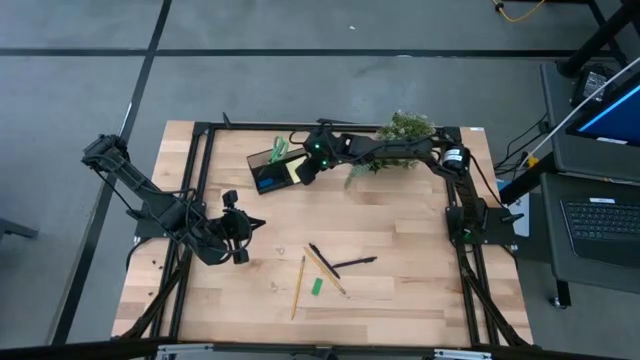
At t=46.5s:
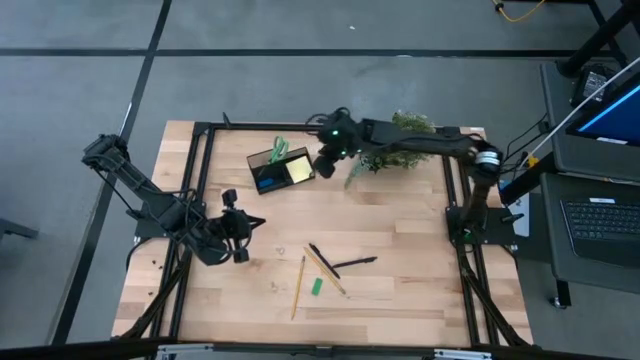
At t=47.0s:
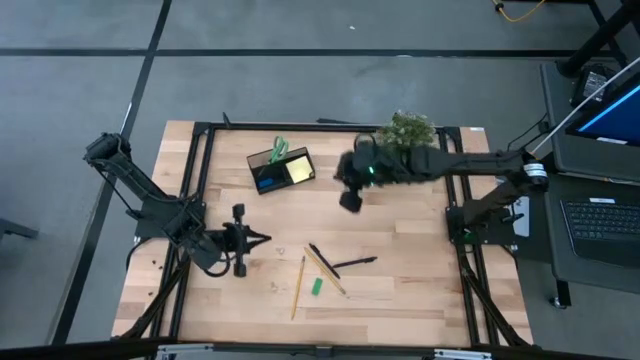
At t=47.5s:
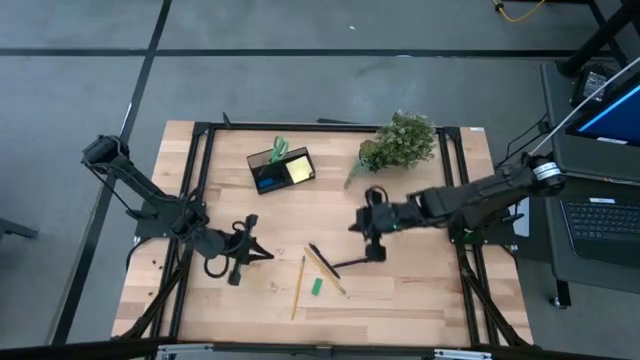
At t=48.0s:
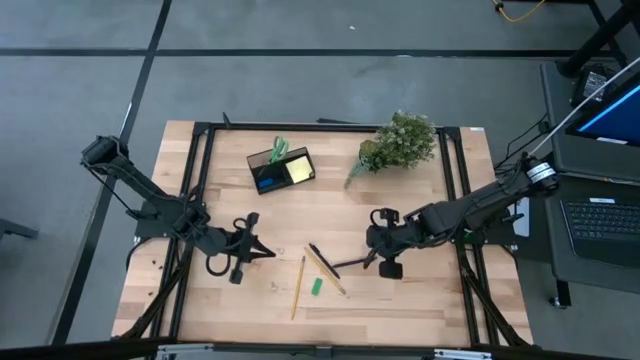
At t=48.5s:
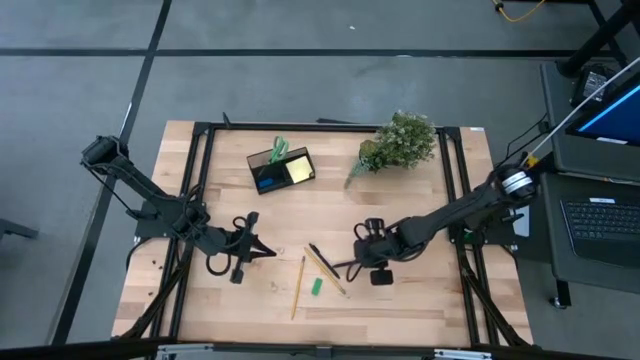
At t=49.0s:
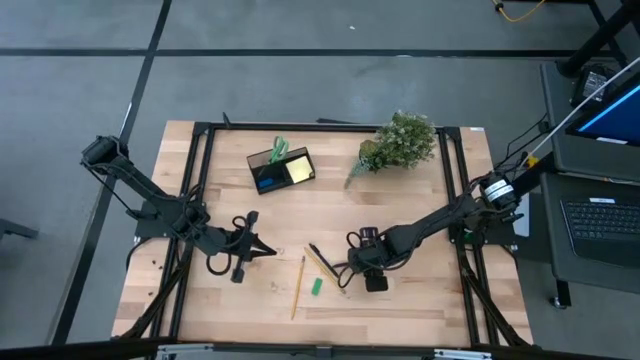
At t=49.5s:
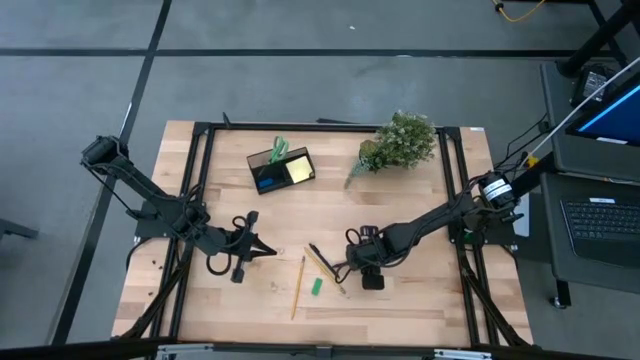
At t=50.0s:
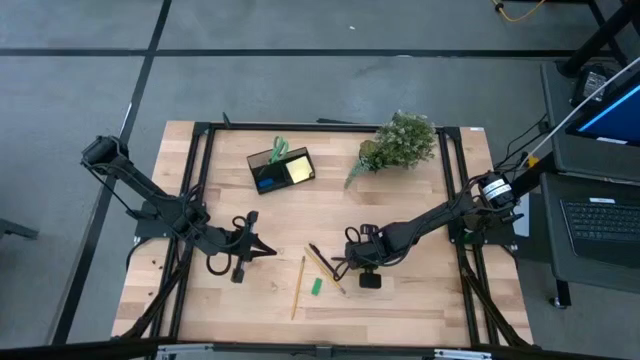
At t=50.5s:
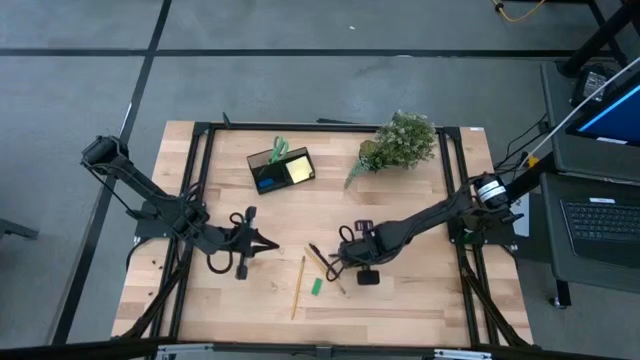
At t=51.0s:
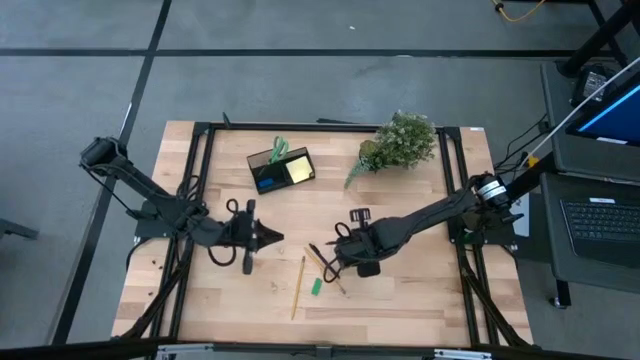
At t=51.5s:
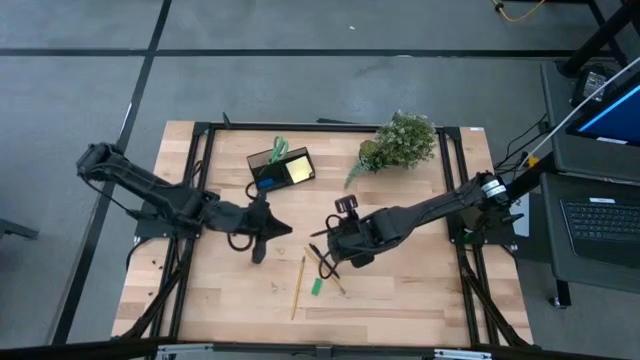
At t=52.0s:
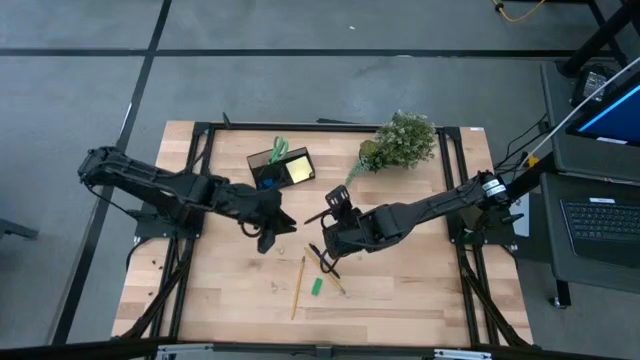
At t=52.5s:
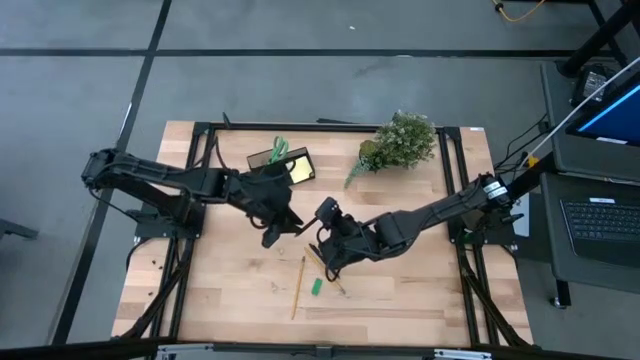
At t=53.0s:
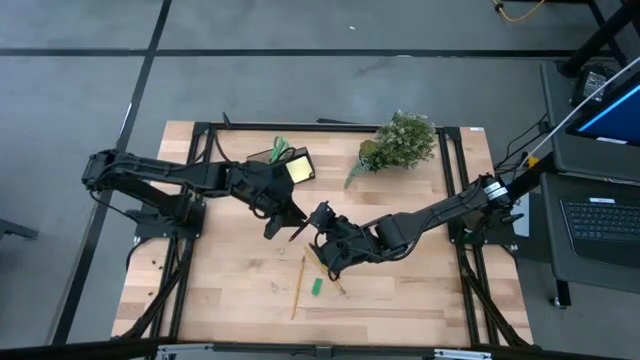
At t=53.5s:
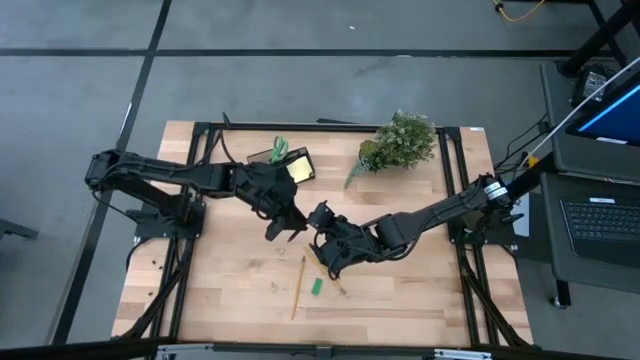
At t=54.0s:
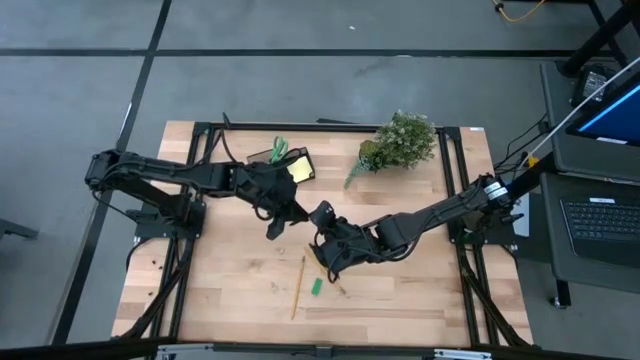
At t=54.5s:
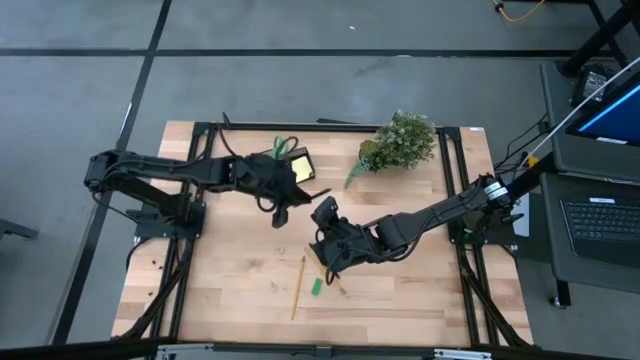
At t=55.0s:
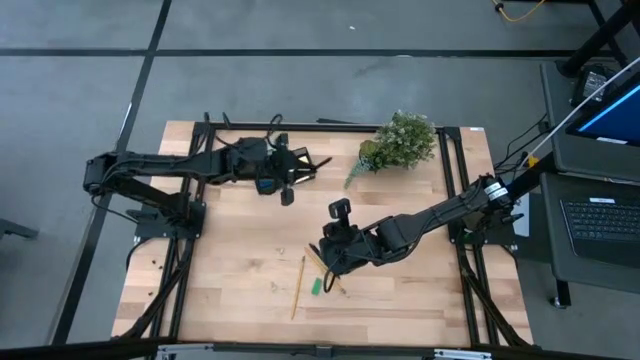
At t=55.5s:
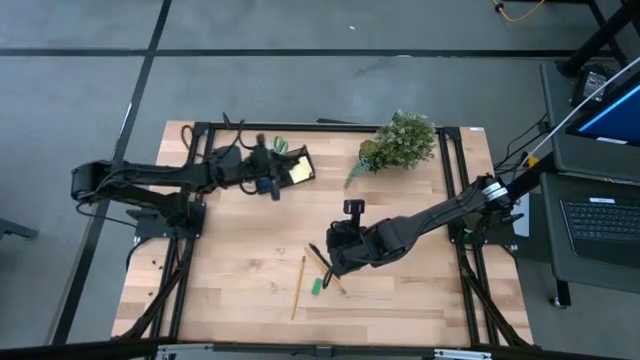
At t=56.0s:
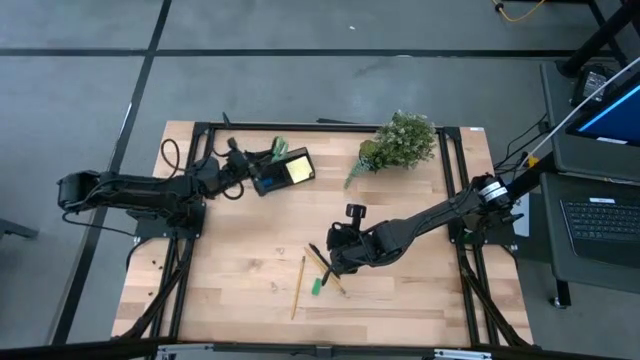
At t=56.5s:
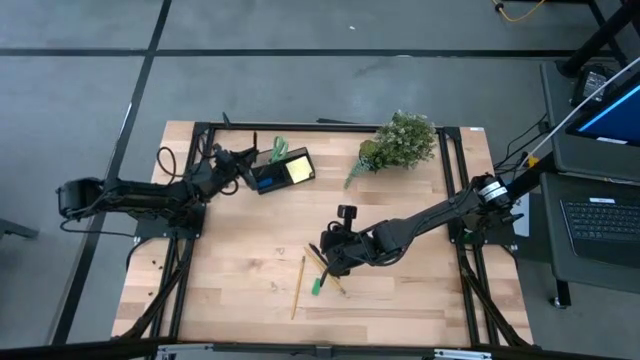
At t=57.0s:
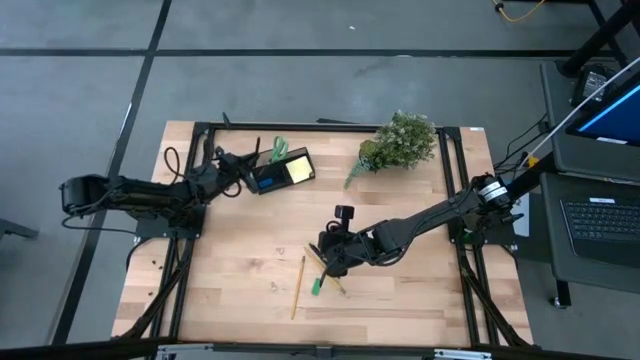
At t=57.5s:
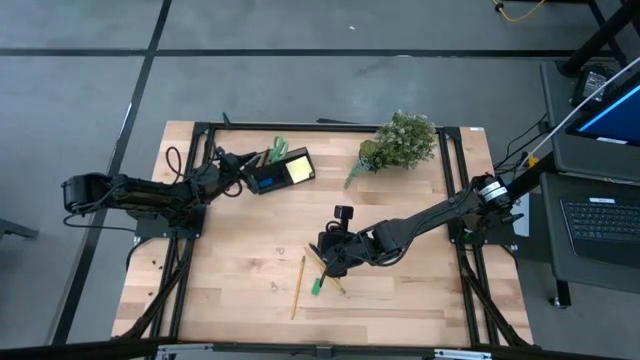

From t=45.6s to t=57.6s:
Task: Pick and place office supplies into organizer
Put the right black pen into the desk organizer

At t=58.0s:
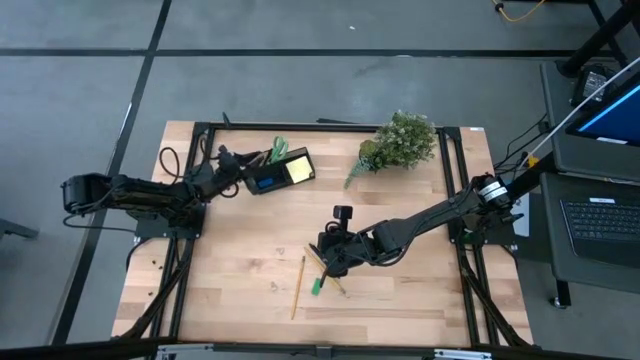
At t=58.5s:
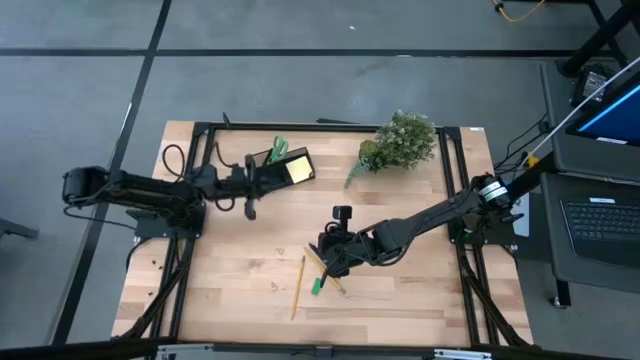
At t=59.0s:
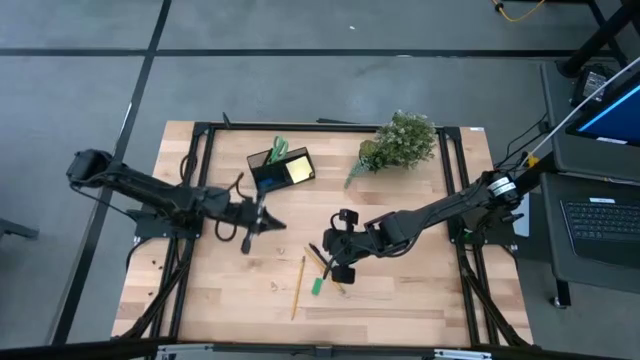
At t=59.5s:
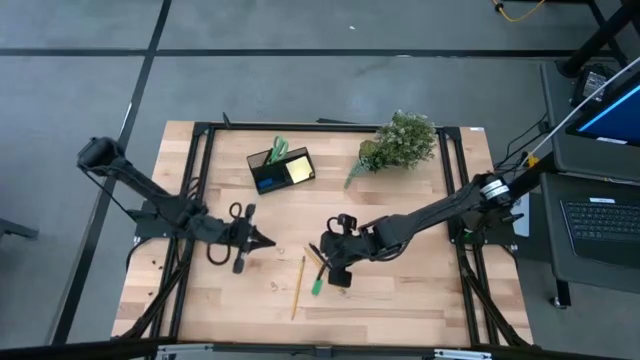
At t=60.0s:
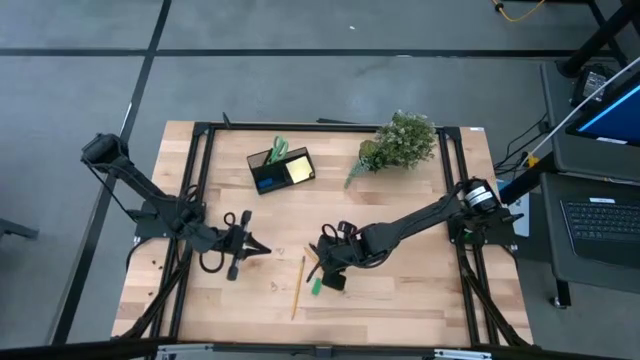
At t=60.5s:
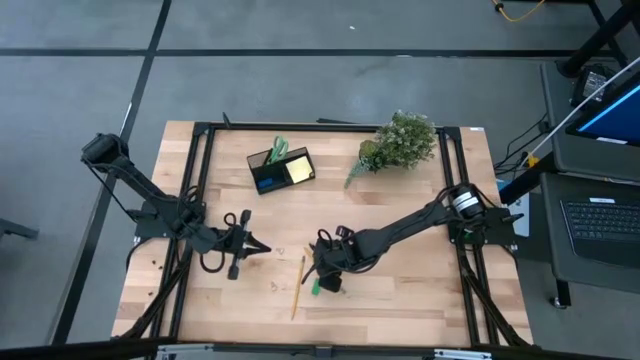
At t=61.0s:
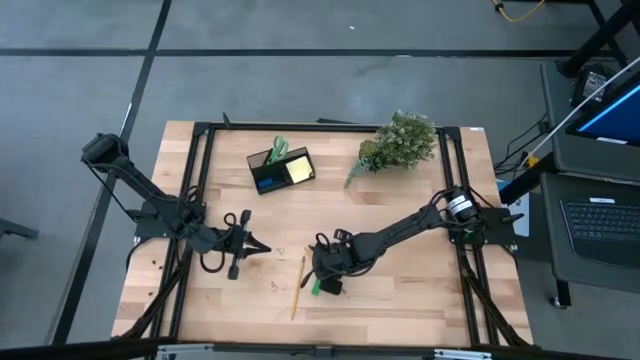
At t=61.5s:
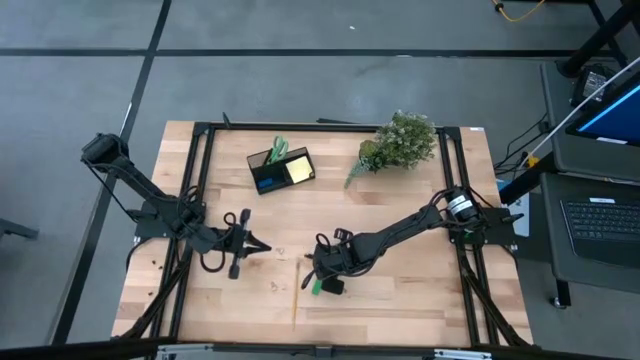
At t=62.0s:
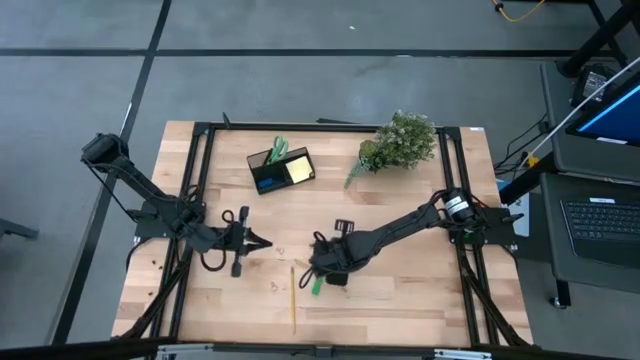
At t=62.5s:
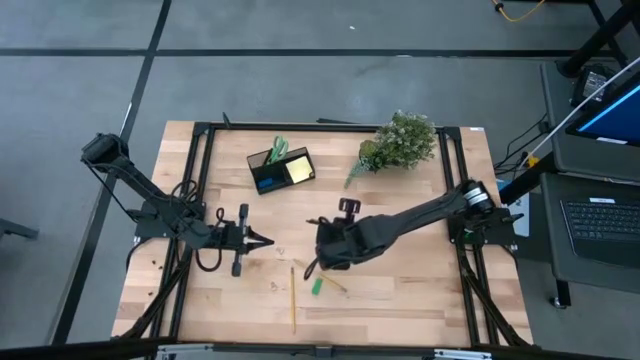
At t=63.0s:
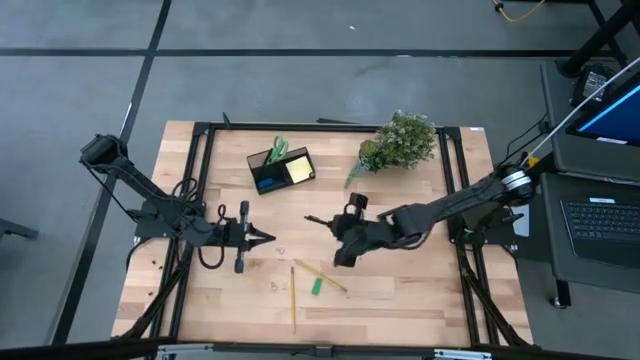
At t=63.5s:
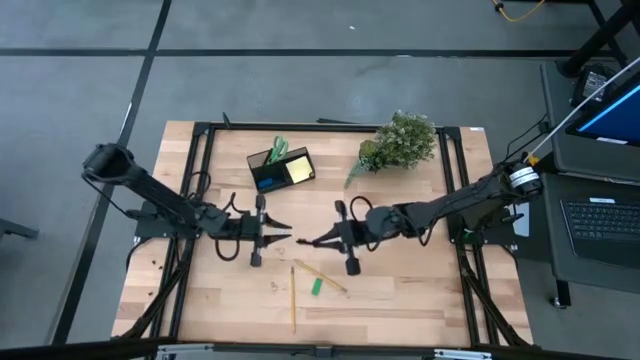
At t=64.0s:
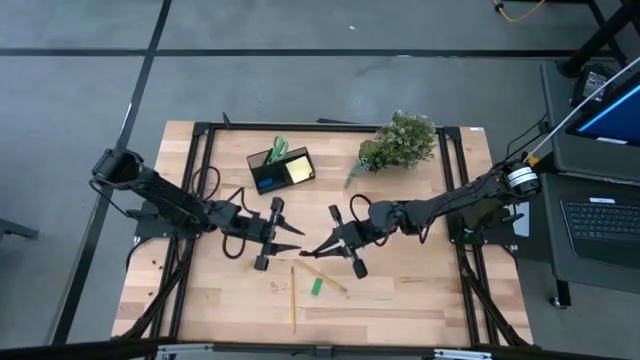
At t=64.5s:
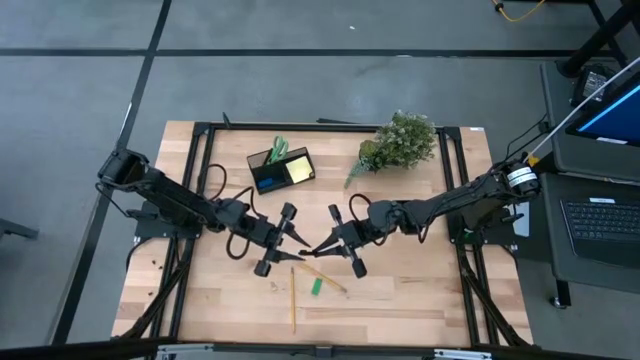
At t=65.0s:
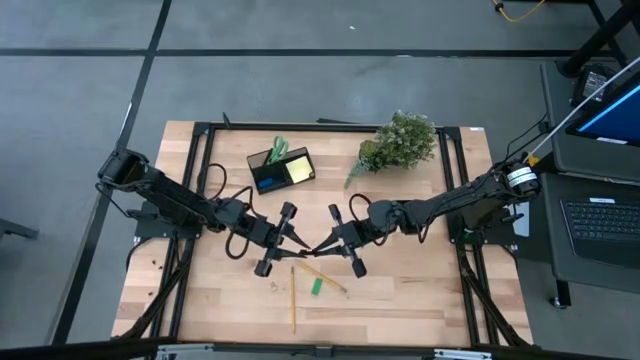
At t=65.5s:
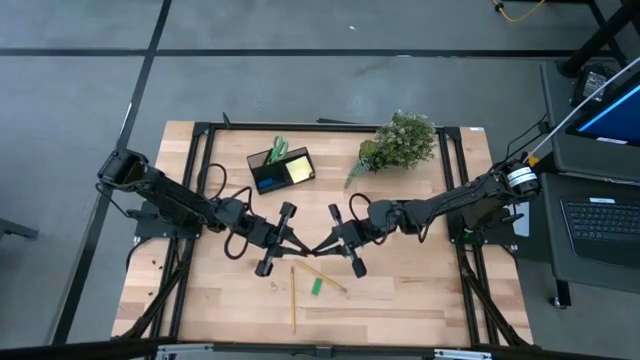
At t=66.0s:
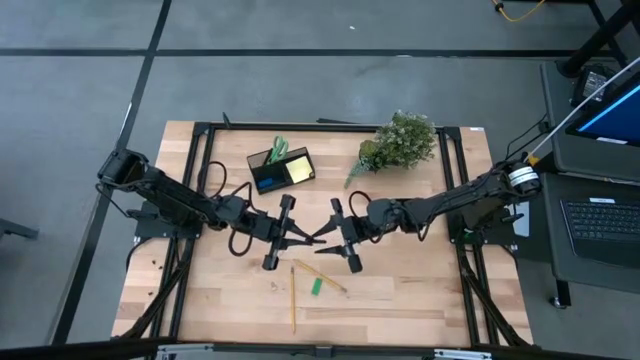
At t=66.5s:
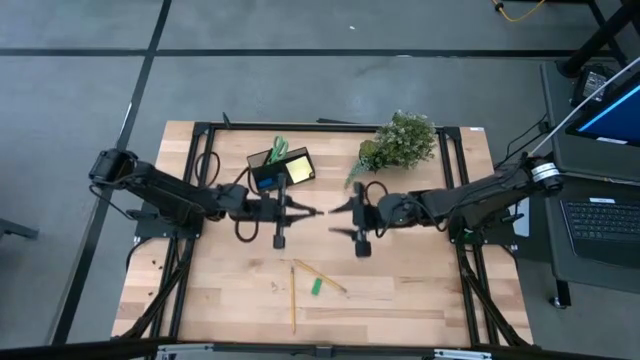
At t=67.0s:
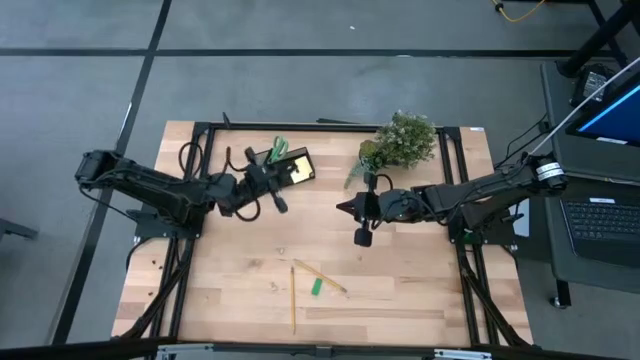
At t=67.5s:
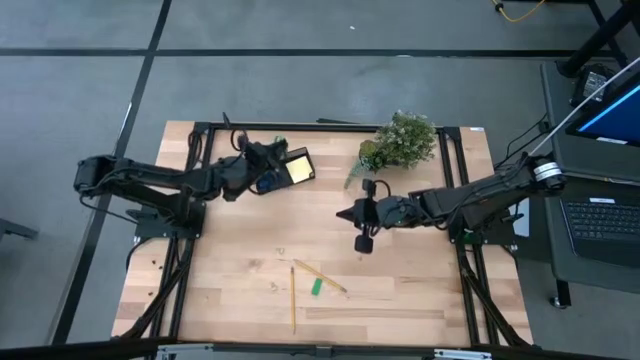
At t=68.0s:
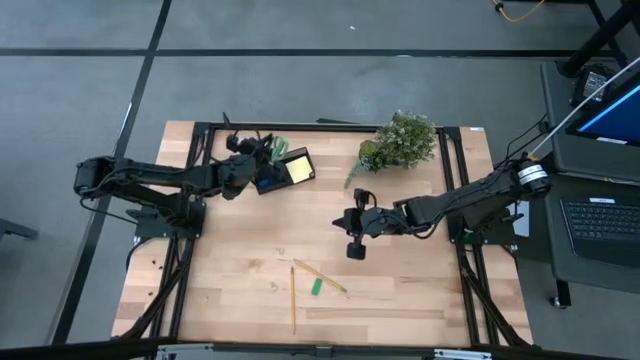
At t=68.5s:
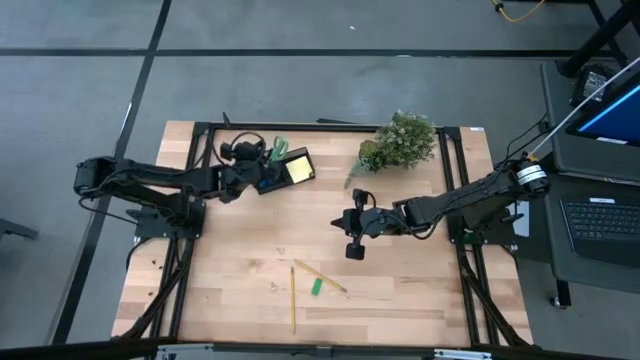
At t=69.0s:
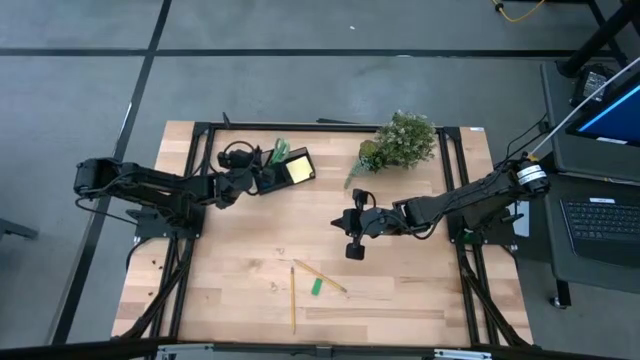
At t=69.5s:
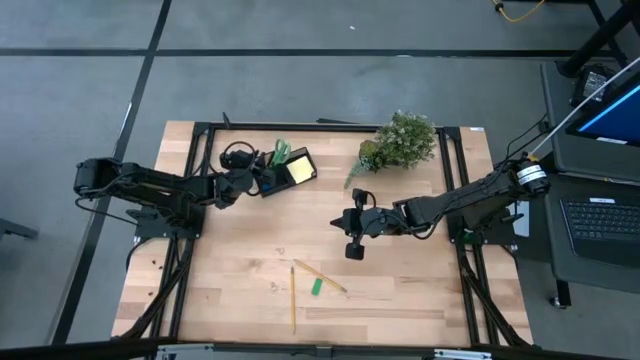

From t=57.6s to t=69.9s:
Put the black pen into the desk organizer
